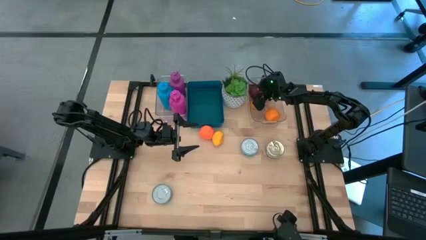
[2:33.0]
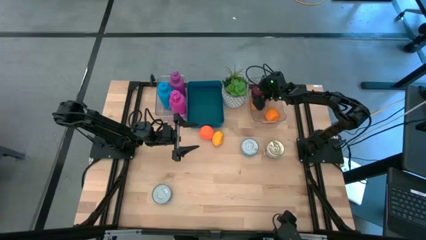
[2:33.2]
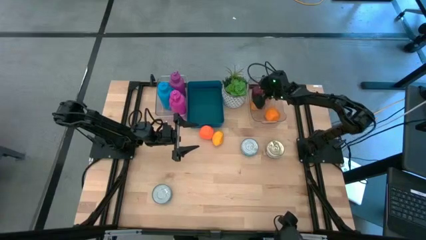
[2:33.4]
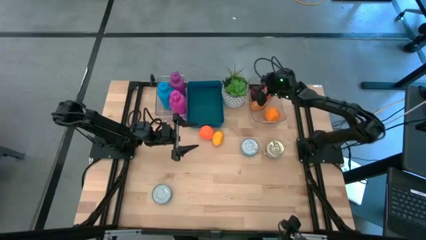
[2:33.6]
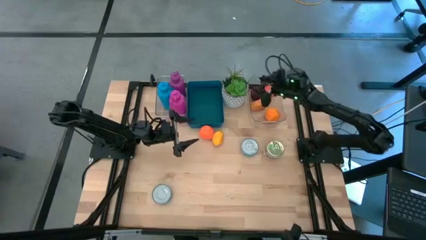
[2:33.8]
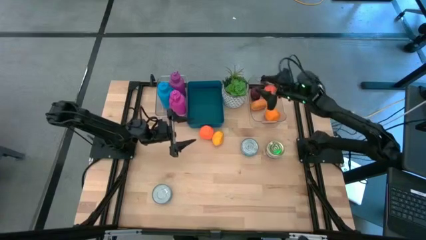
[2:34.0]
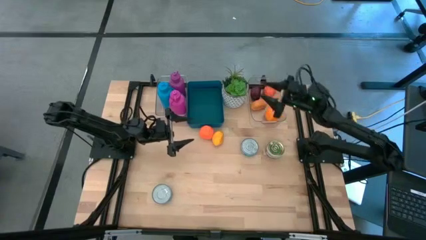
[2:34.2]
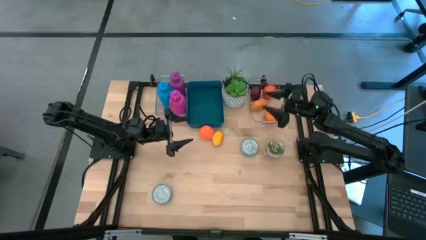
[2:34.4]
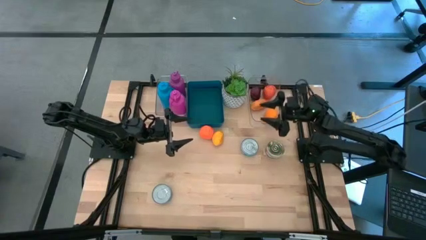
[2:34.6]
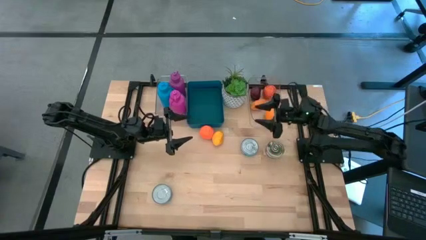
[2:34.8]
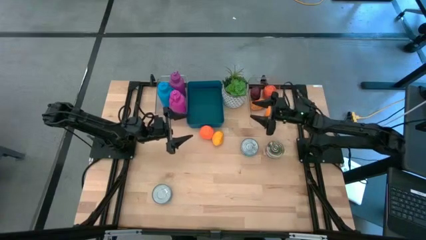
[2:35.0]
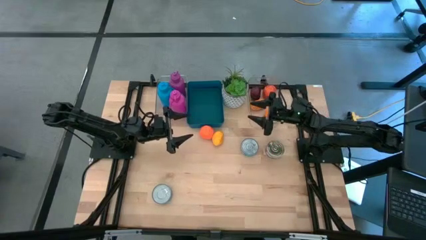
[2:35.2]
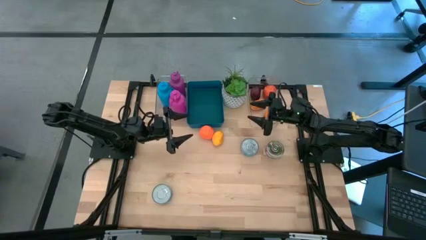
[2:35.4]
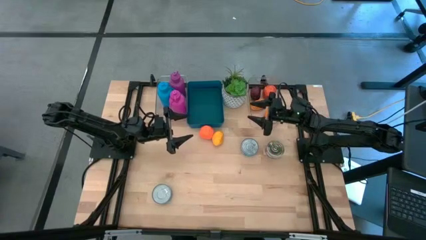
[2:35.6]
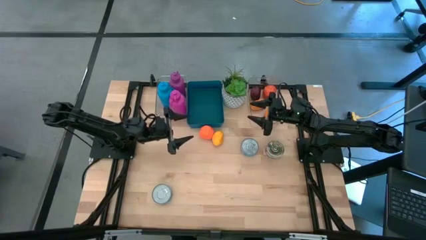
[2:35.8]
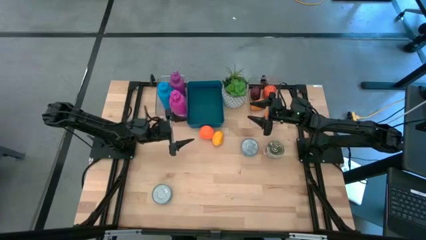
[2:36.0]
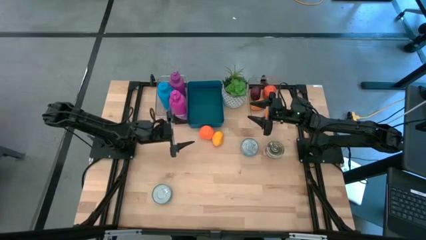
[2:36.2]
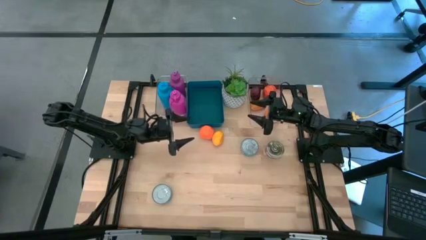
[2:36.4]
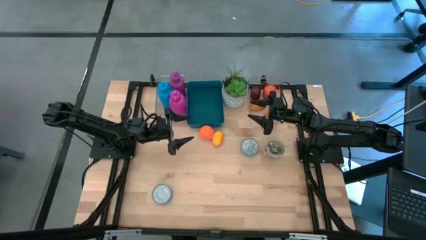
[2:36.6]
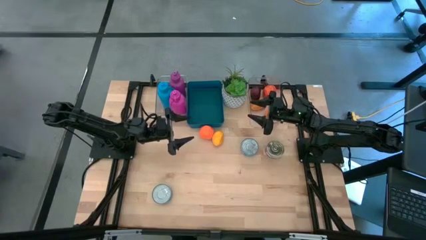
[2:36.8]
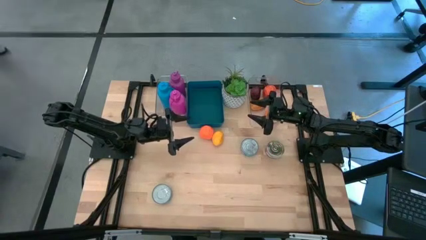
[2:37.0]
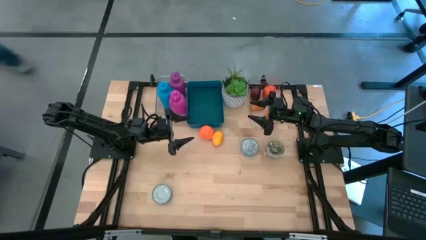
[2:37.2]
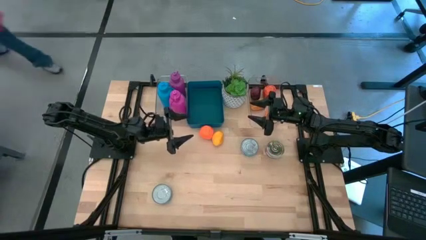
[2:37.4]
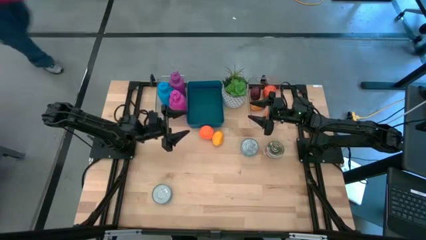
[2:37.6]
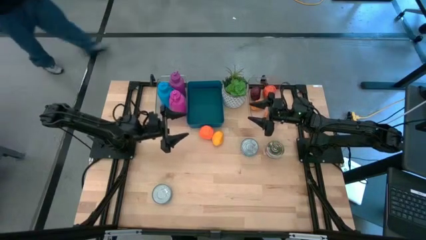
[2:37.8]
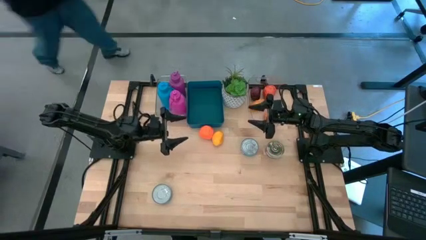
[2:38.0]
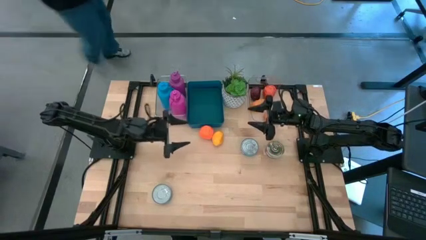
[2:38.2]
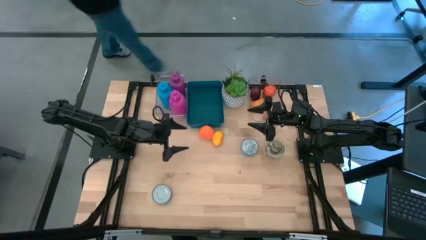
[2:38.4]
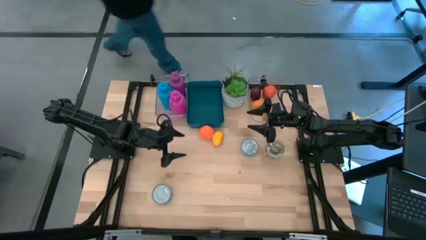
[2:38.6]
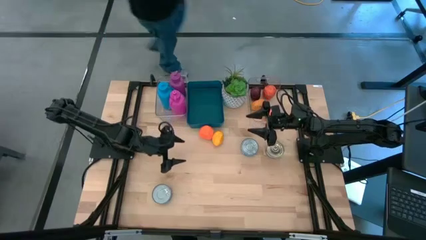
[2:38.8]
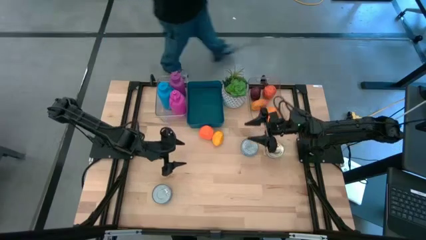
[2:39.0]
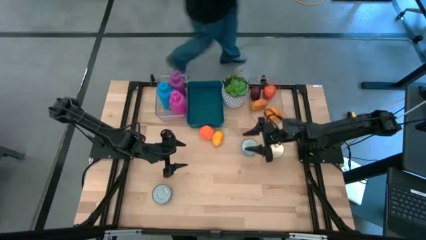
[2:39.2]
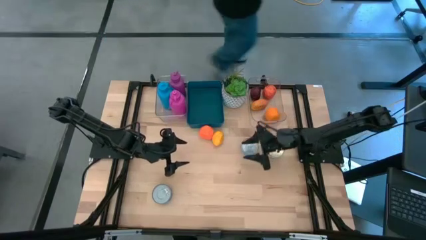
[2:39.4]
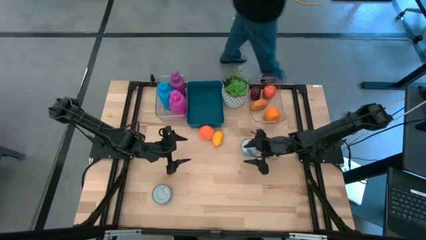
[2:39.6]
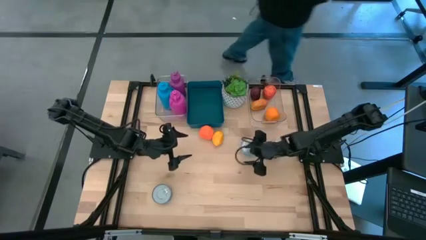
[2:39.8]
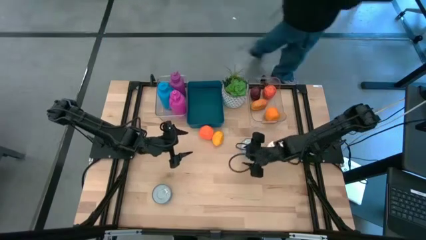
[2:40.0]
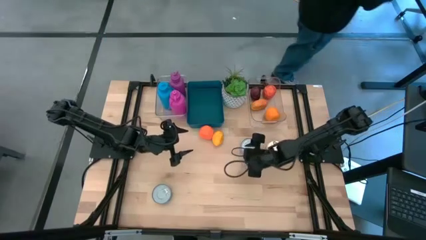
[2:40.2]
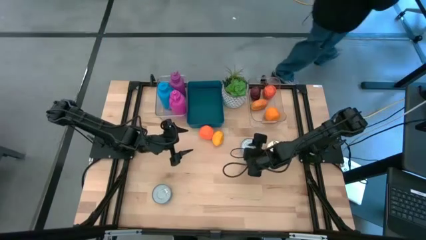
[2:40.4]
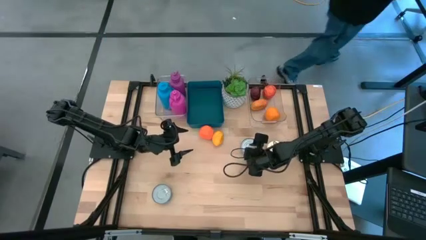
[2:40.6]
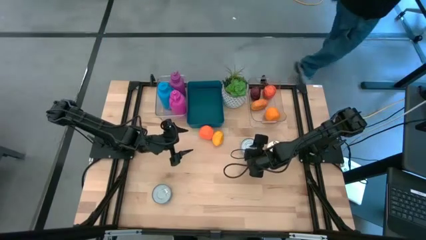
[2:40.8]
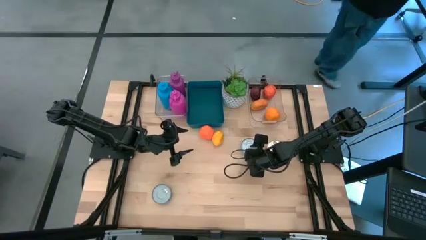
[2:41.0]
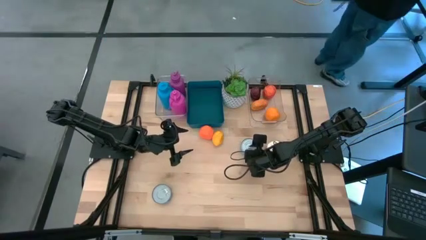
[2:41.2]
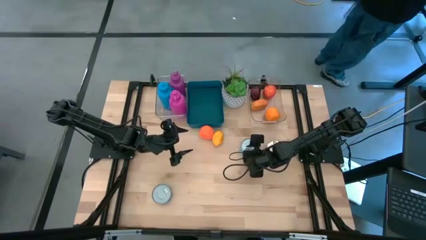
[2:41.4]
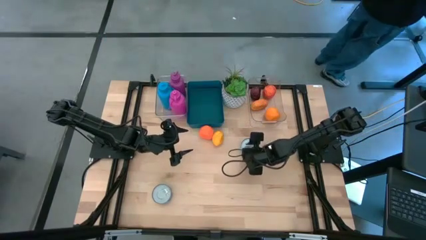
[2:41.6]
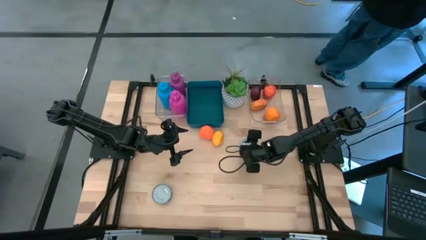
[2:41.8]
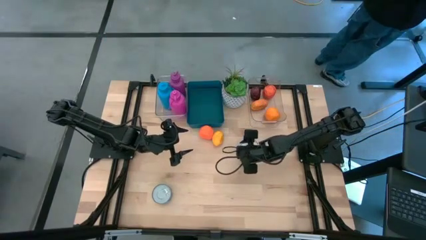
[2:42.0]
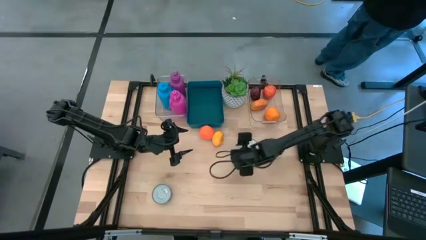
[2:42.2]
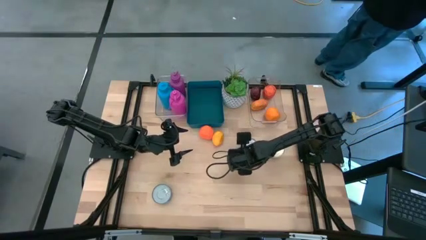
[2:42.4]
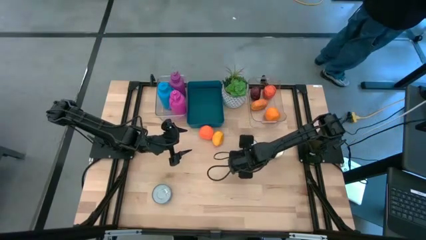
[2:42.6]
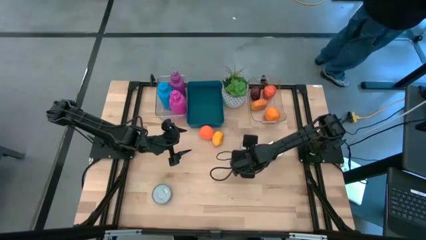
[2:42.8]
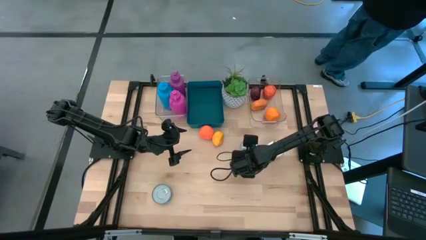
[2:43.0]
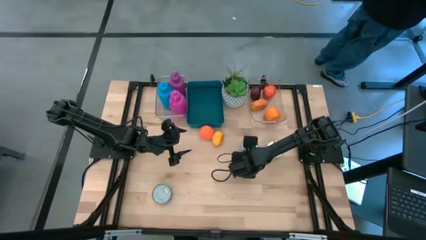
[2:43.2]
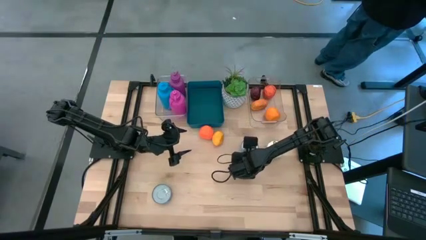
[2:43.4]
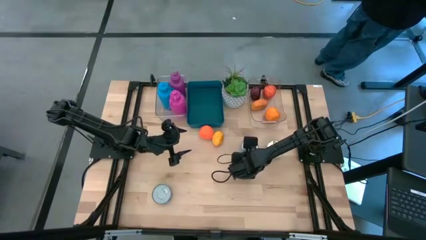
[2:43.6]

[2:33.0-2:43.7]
Task: Pick & Place Food Item
Put the green tuna can into the blue bin

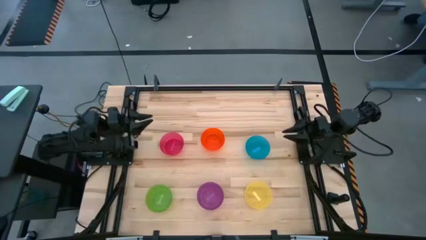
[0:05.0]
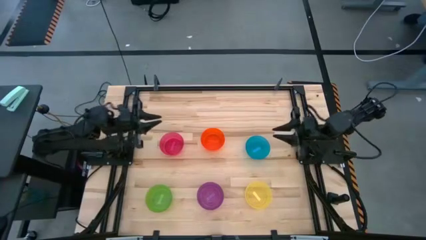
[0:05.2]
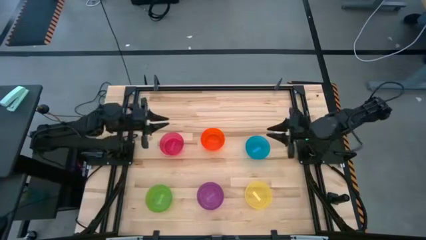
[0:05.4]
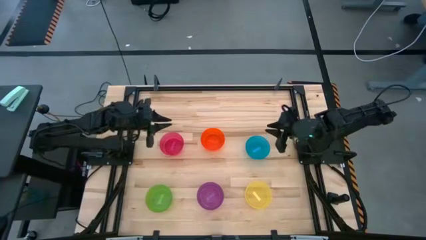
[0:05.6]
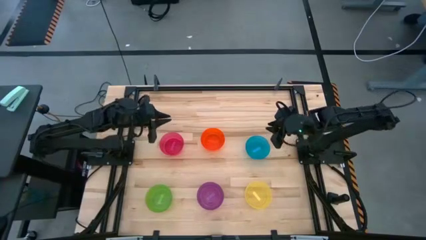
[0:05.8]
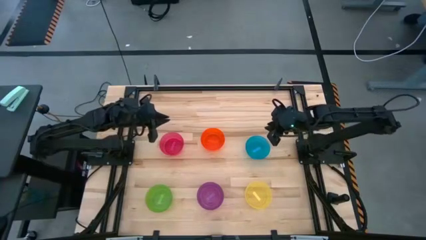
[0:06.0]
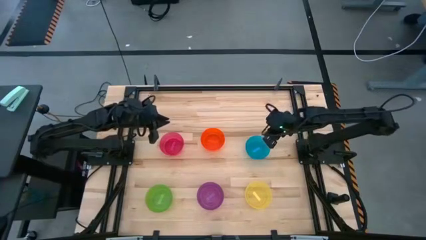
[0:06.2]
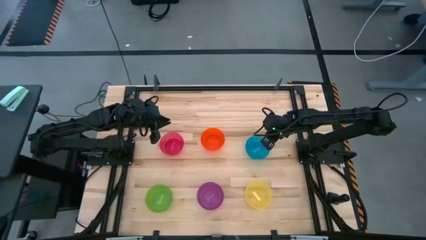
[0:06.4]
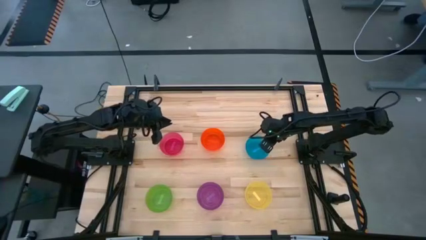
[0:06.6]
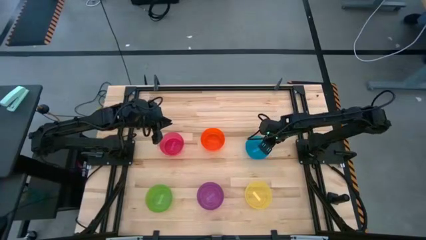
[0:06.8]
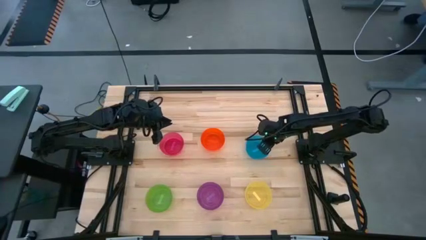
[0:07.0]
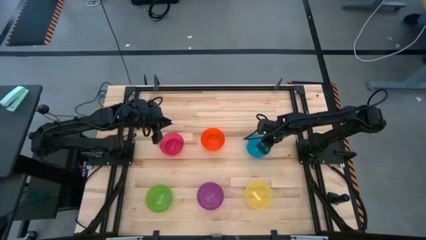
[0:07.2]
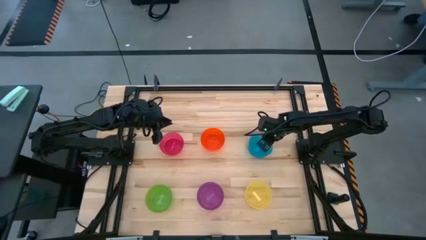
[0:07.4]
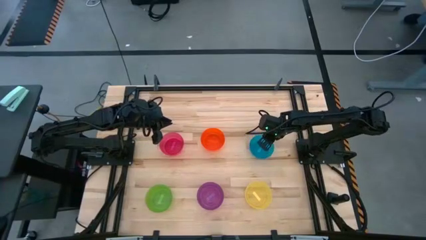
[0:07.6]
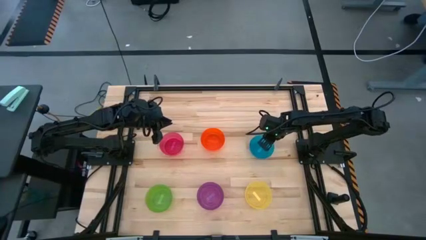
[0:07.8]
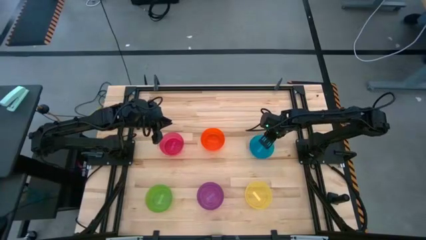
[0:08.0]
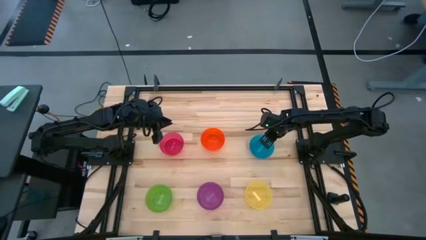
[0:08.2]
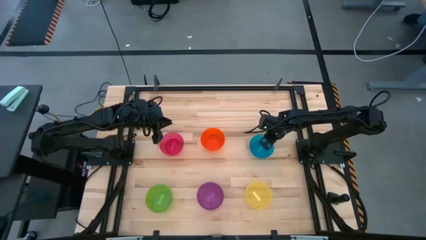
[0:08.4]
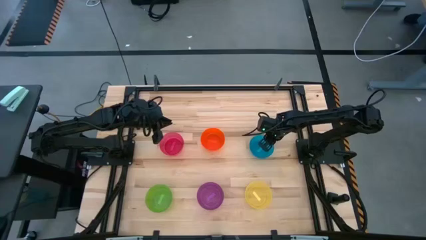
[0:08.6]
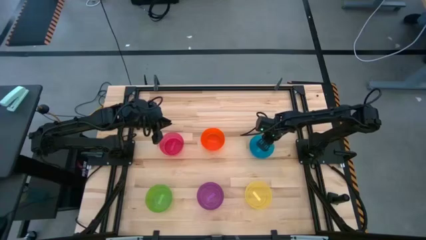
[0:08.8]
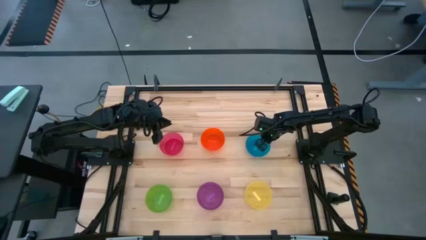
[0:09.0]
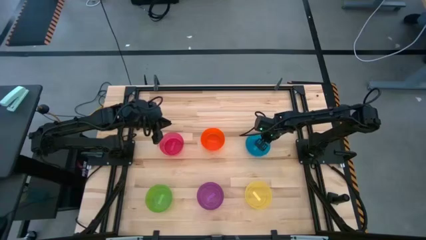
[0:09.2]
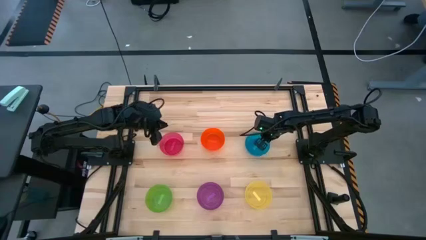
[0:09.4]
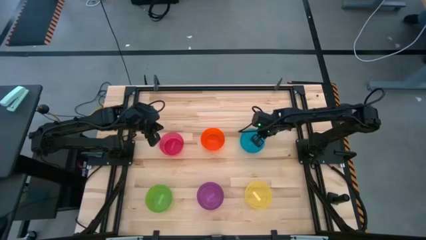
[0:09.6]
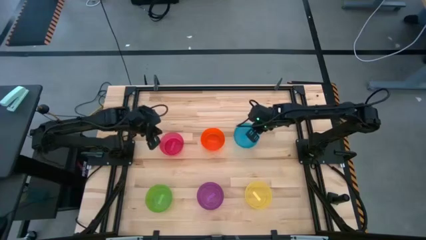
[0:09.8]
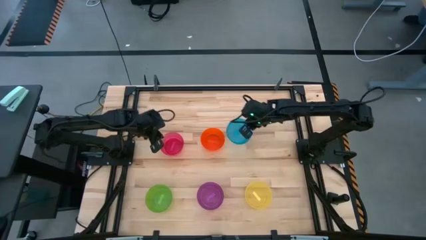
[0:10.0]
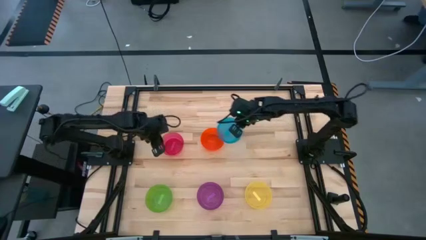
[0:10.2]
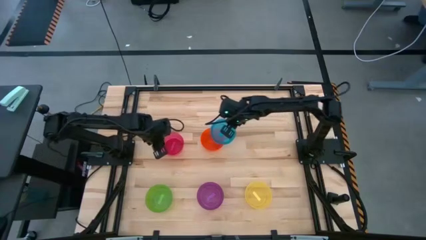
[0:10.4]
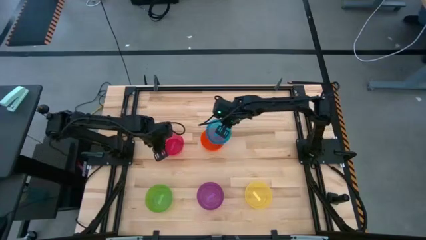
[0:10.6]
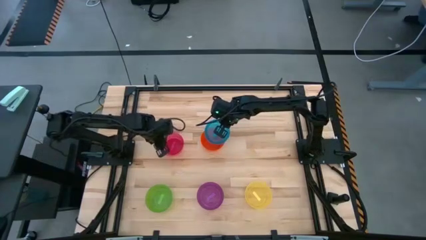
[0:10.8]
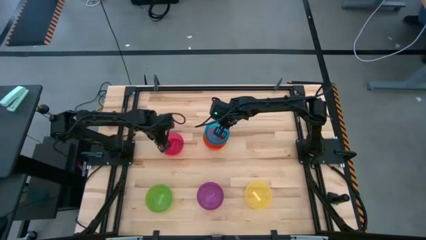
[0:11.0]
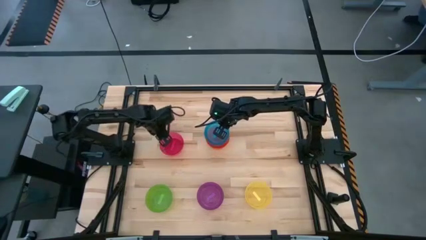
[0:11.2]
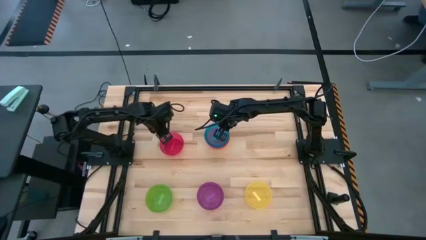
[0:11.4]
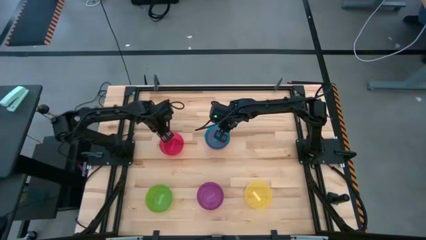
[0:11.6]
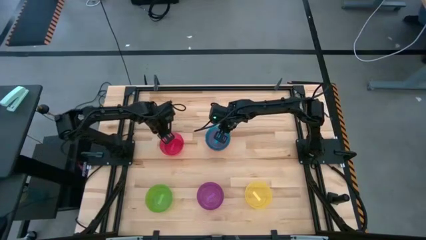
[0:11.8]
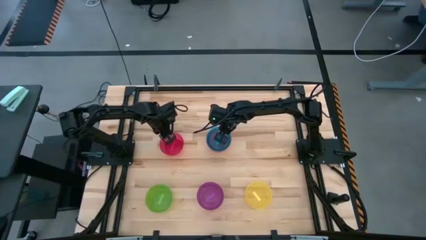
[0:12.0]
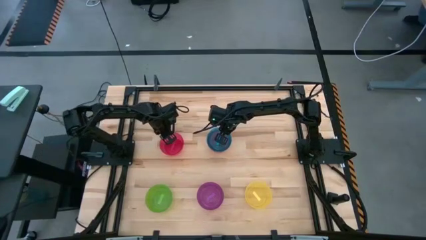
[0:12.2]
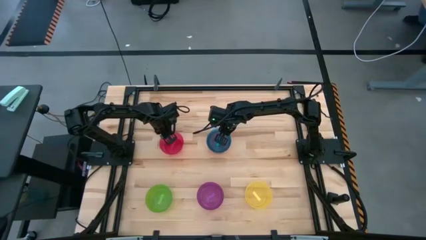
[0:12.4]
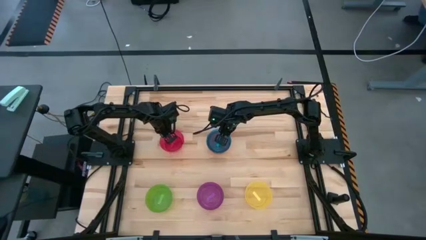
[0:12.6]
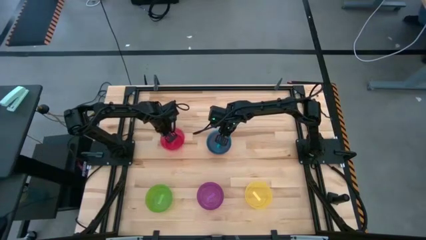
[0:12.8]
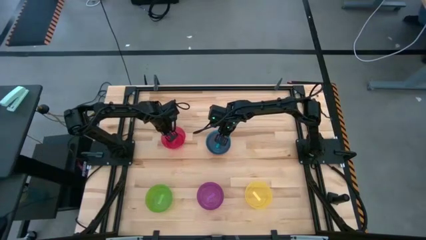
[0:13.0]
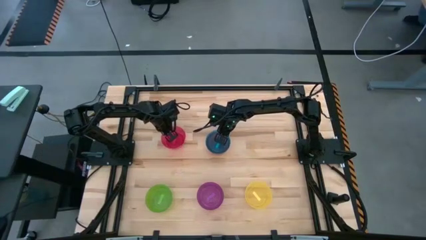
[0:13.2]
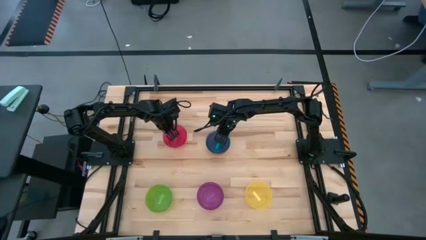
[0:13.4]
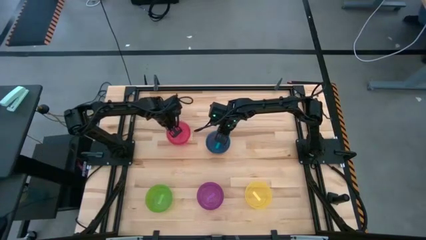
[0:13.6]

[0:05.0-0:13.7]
Task: Nest bowls inside each other
Stack the blue bowl on top of the orange bowl
